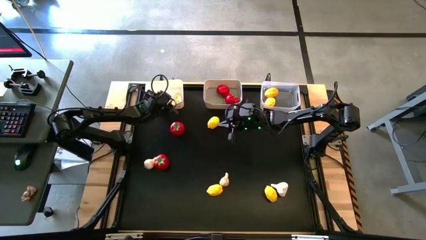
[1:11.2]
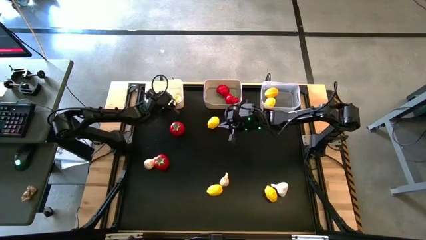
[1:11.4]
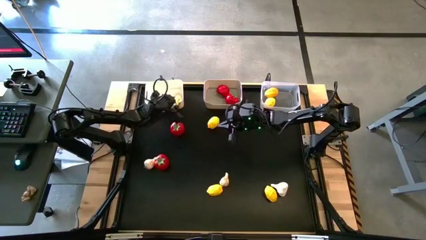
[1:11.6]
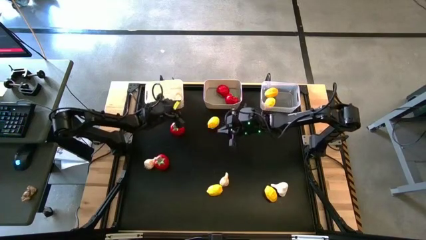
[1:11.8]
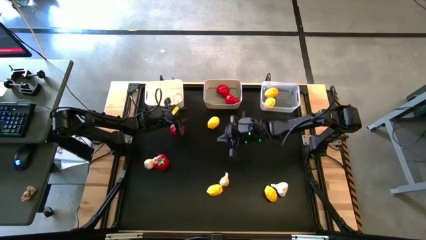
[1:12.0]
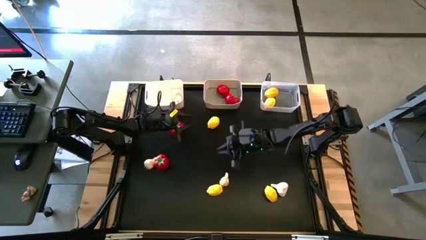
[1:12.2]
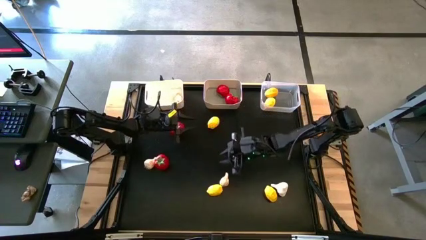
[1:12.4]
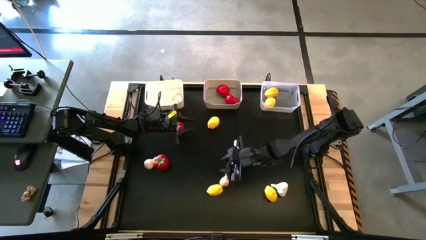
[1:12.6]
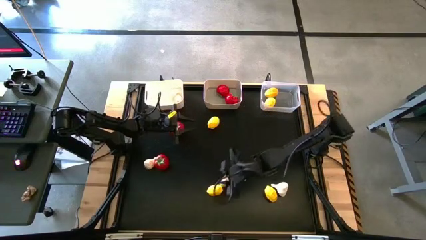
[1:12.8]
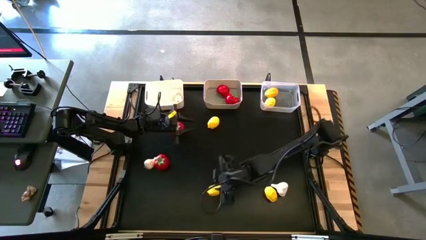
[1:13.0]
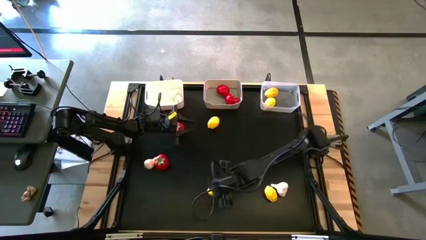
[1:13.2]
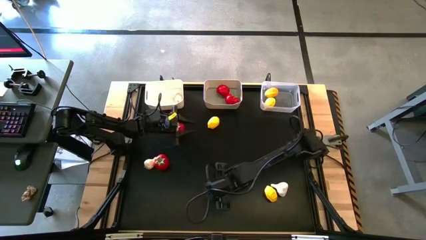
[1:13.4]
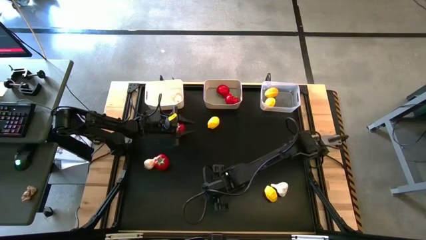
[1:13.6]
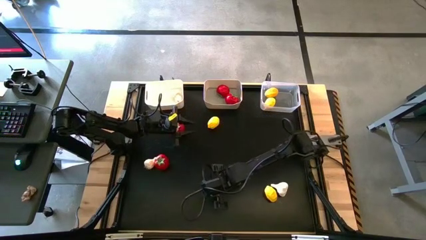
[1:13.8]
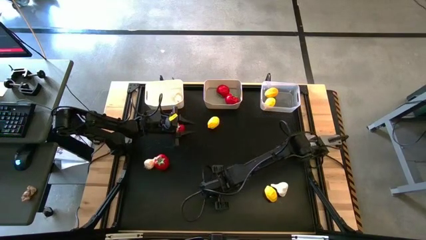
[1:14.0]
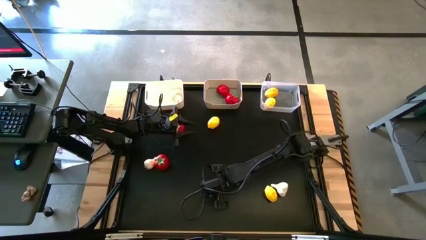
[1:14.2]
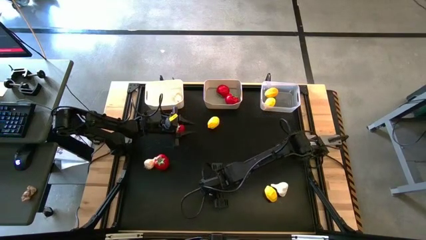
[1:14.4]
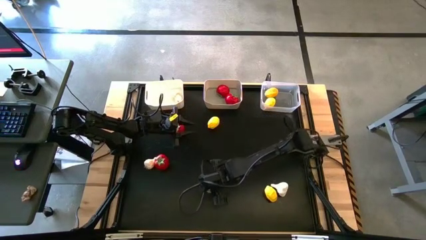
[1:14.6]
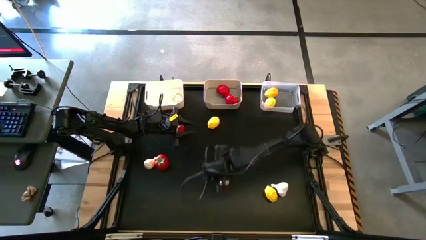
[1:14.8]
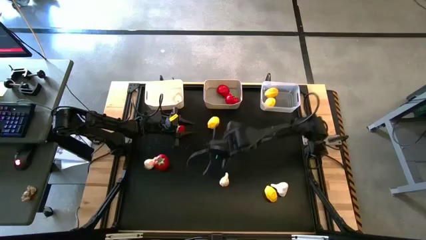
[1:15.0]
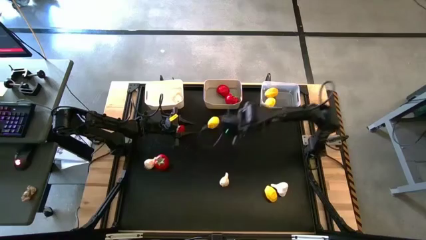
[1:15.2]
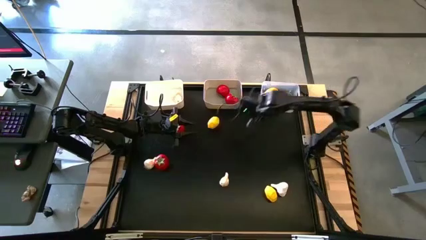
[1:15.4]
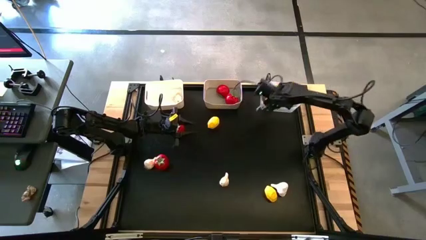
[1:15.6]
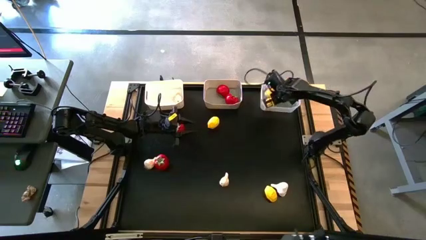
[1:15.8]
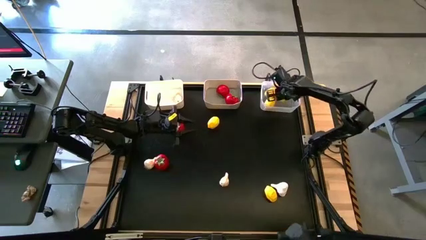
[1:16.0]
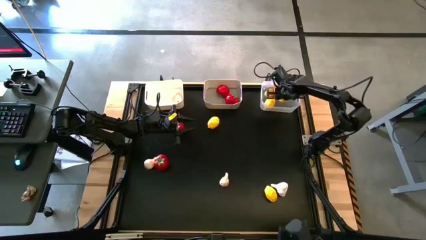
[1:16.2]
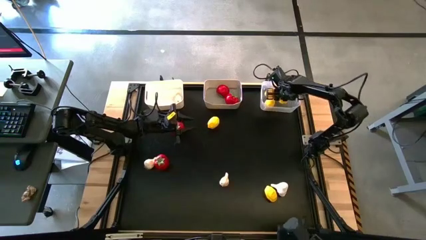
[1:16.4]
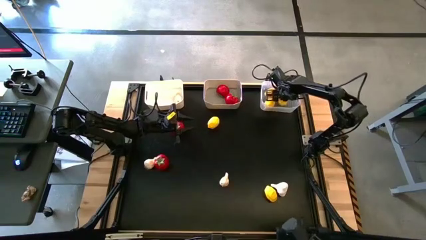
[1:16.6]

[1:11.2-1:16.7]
Task: Sort produce into baskets
Put the bottom middle lemon into the transparent bin

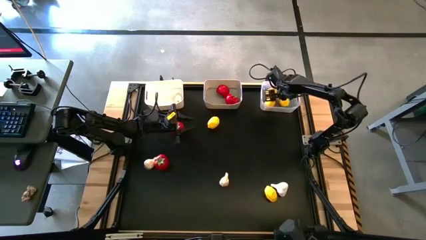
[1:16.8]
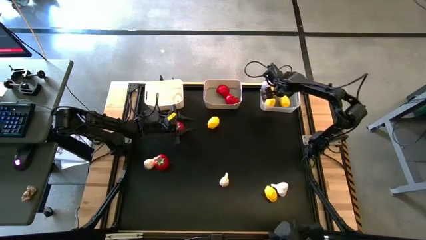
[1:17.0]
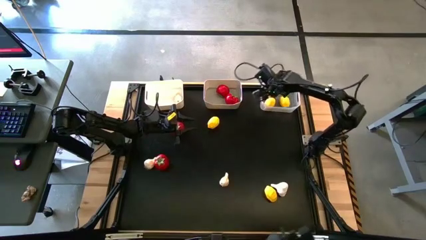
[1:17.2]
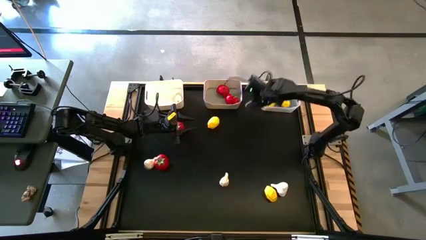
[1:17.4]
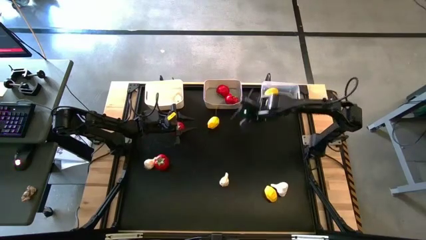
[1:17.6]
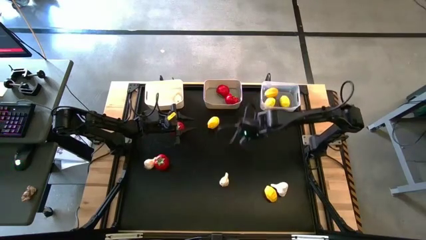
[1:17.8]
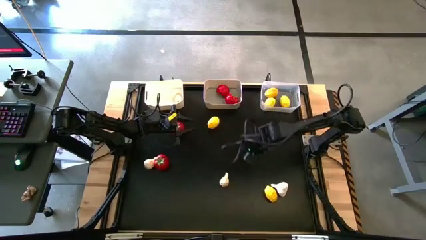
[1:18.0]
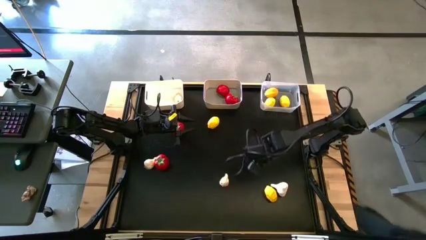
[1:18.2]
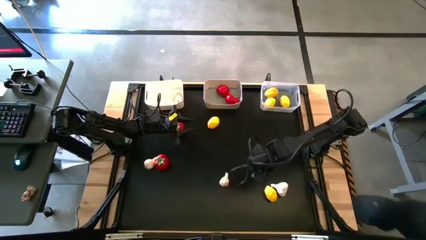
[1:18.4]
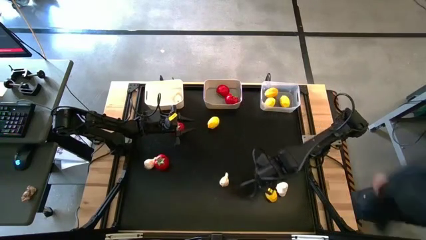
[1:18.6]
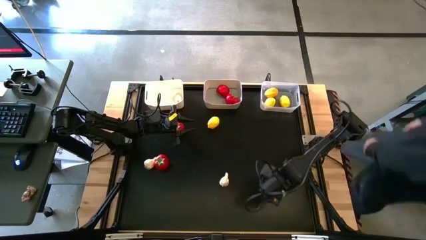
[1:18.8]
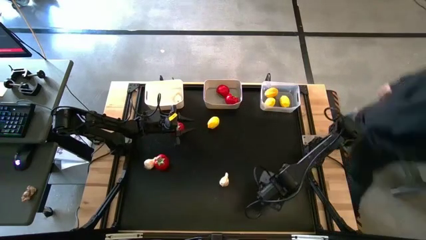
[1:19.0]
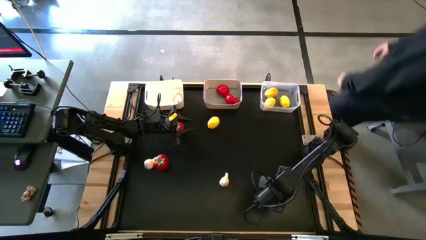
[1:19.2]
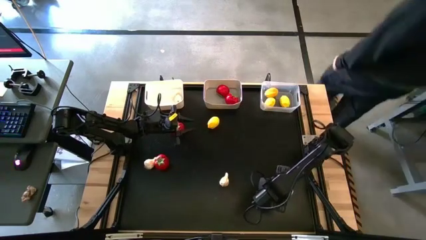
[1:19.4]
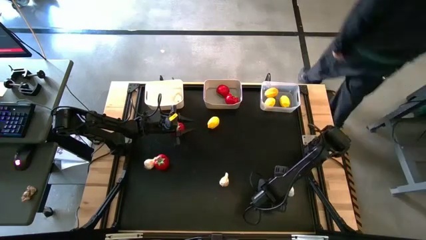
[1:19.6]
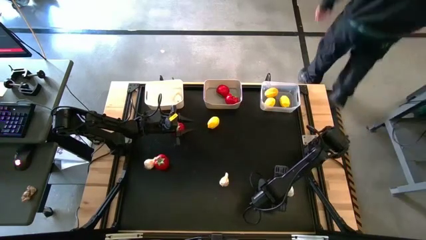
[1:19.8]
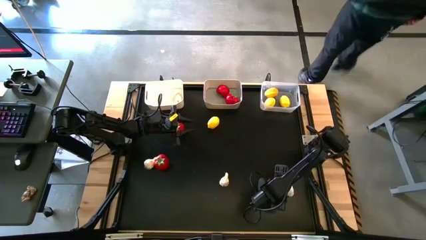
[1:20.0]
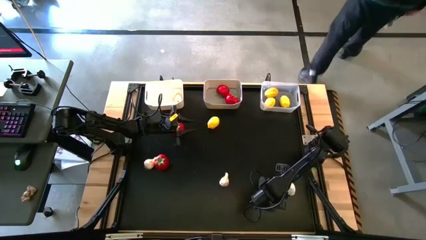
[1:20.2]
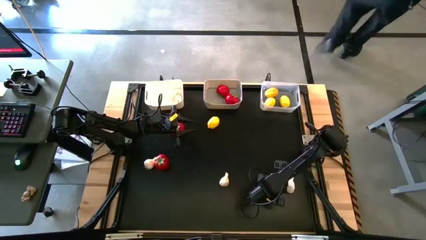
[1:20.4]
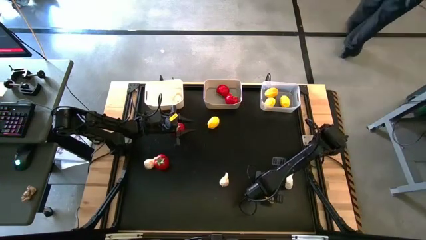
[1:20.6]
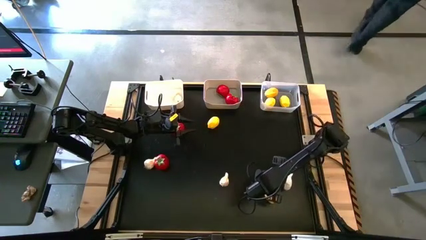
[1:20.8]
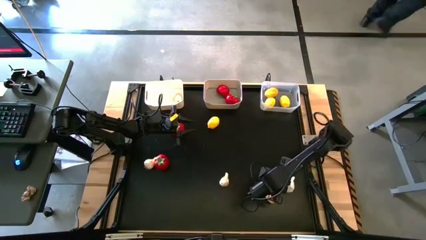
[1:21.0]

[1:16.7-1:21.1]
Put the bottom right garlic into the white bin

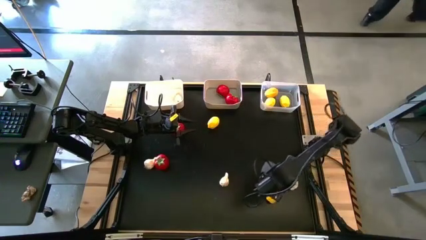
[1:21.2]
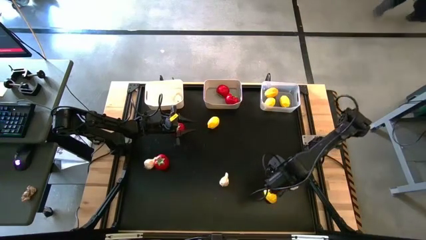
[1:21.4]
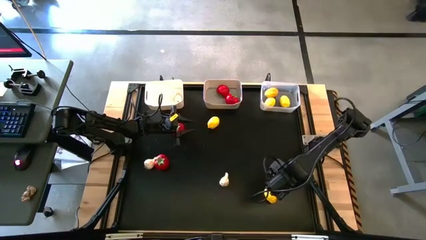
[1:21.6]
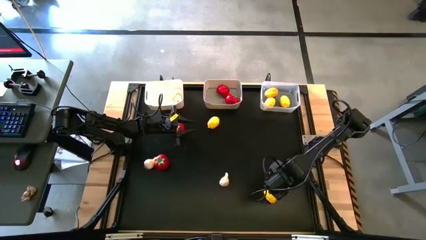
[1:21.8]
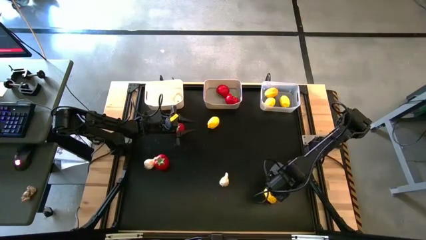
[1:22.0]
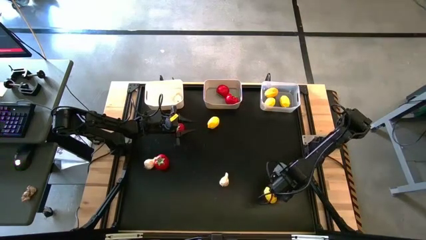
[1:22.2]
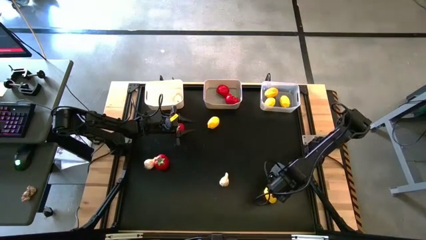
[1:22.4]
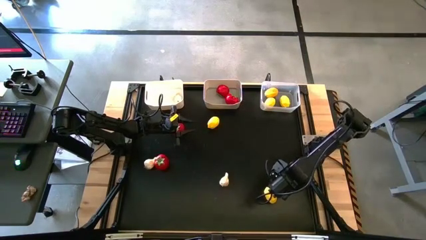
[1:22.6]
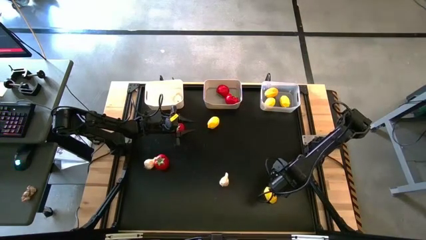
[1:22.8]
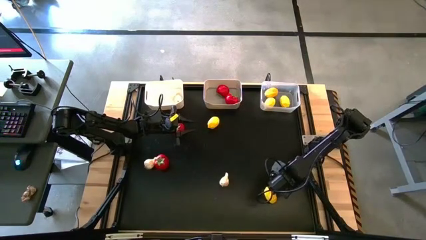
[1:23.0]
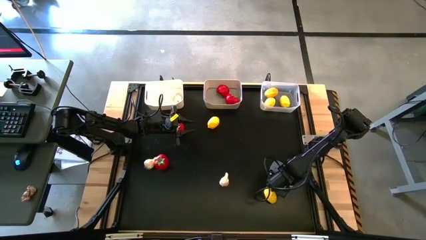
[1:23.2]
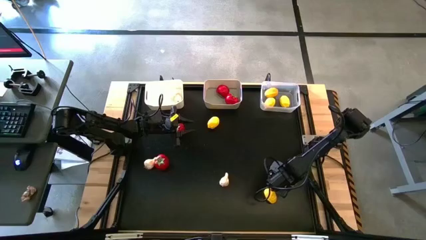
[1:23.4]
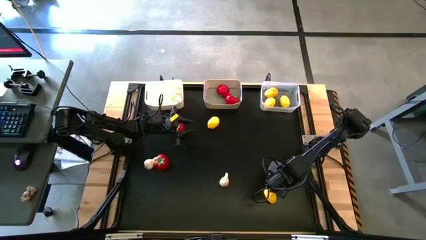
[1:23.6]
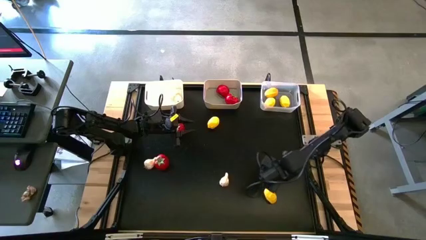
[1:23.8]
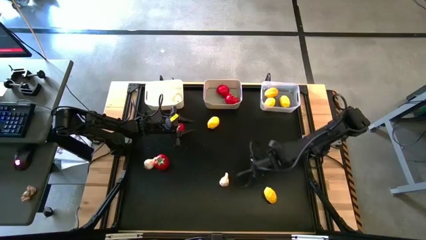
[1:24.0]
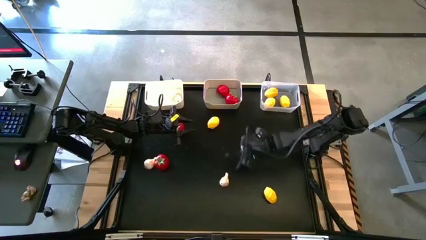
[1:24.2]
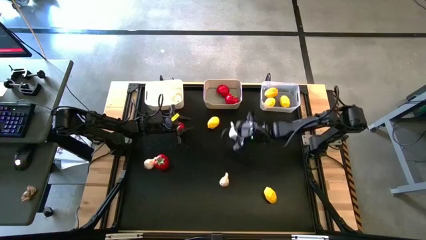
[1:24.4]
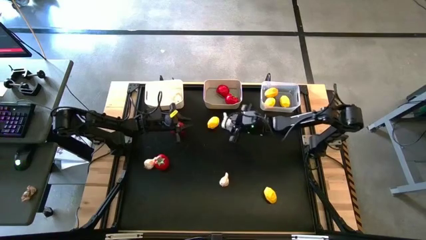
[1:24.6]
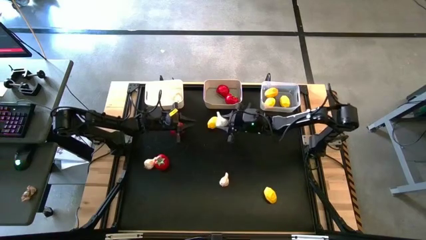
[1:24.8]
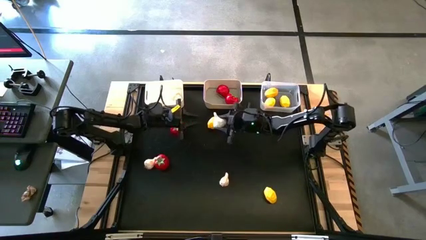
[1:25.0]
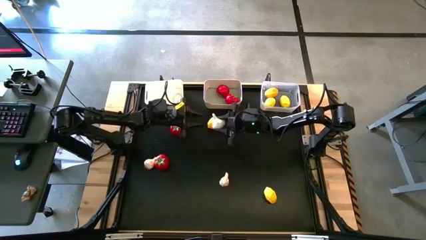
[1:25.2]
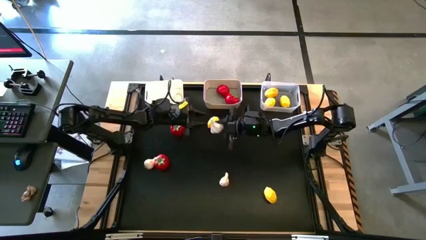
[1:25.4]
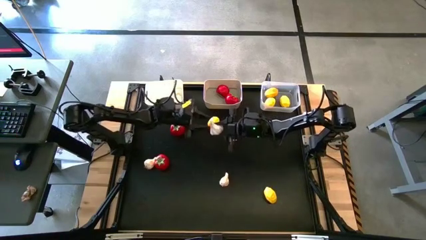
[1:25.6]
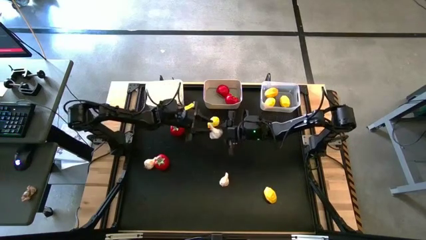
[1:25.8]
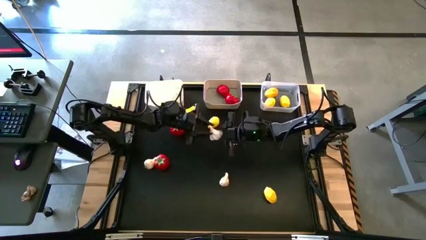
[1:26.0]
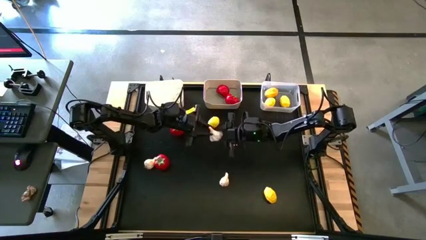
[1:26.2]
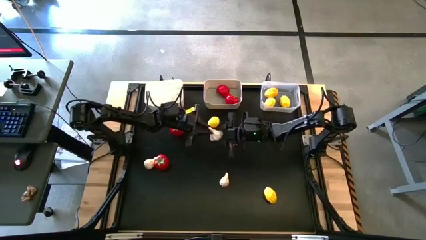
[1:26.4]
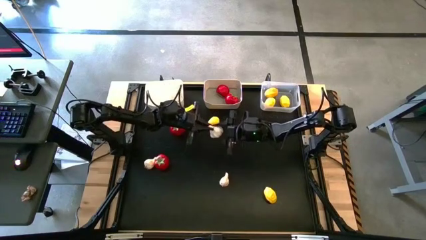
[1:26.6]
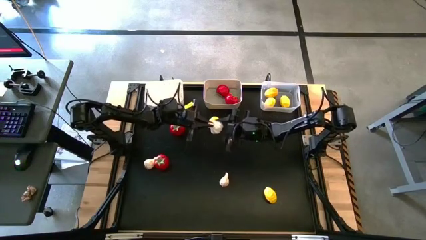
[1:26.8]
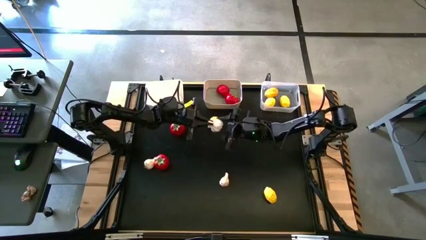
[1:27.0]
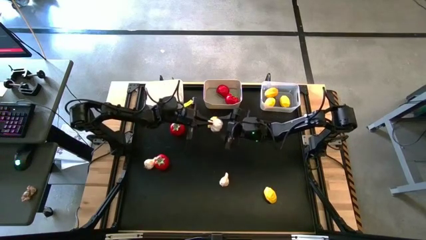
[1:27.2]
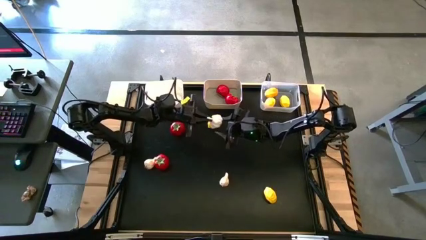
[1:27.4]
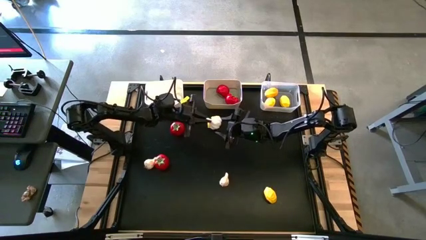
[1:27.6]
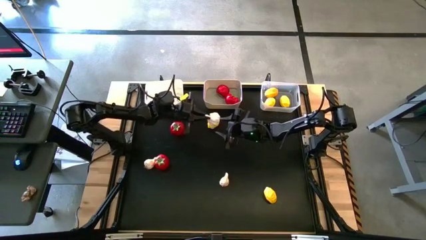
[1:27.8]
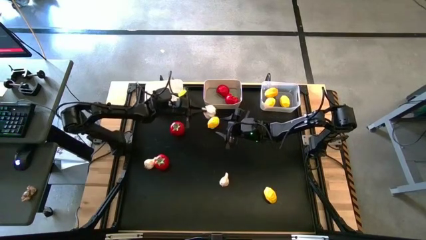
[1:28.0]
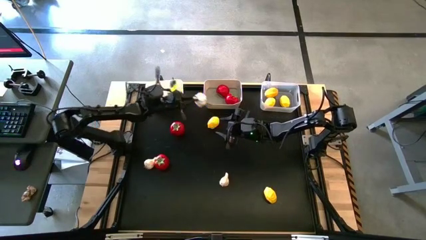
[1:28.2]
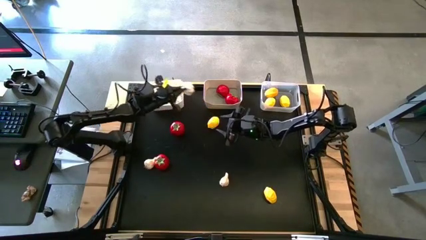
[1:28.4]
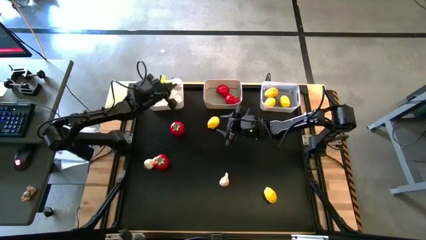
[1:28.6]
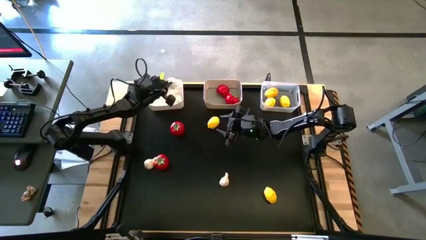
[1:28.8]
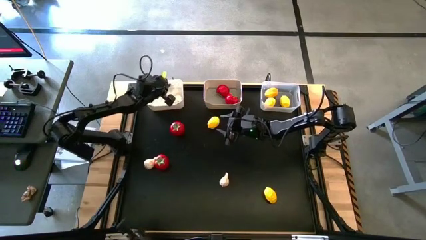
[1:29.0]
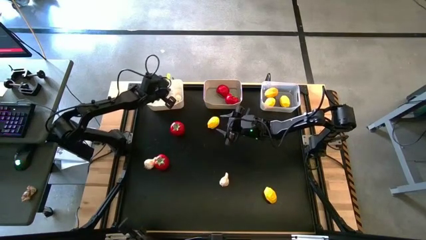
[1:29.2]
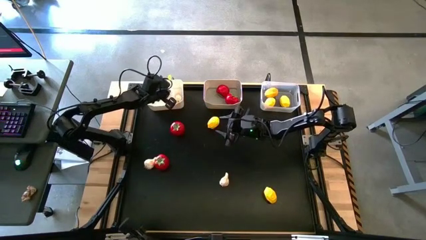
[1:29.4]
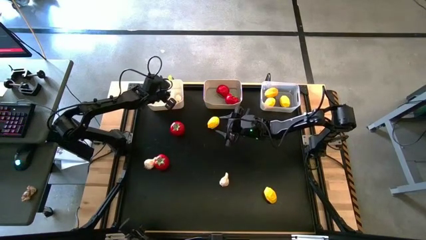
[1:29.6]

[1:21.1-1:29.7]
Put the bottom right garlic into the white bin
